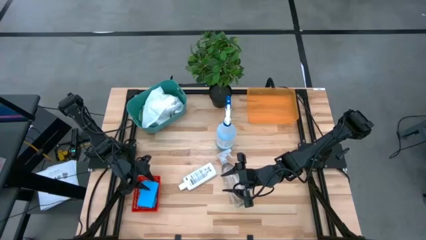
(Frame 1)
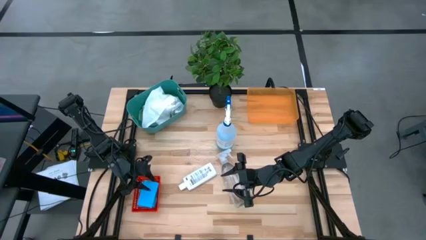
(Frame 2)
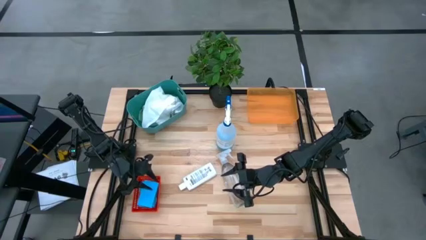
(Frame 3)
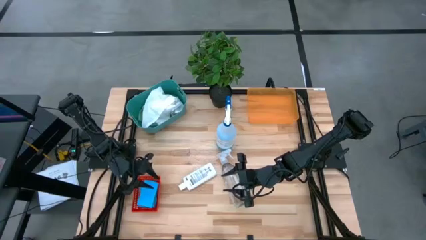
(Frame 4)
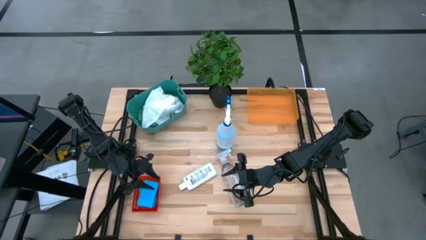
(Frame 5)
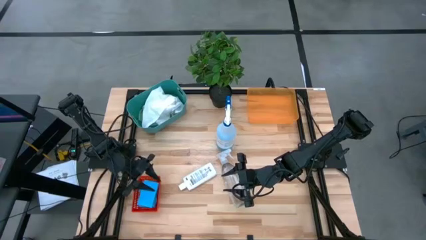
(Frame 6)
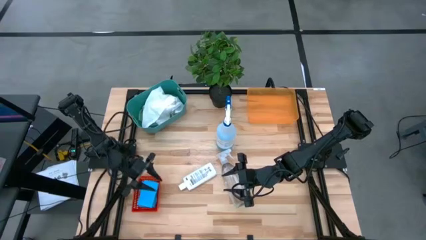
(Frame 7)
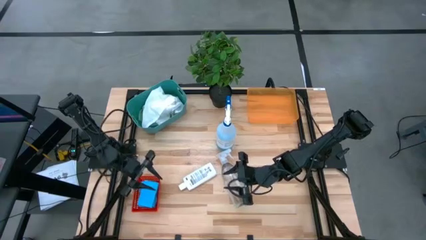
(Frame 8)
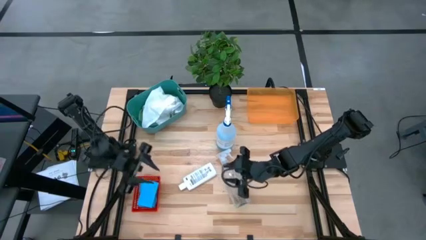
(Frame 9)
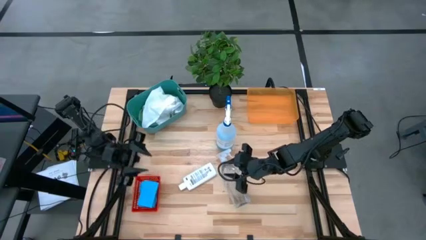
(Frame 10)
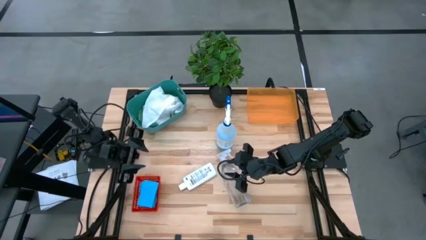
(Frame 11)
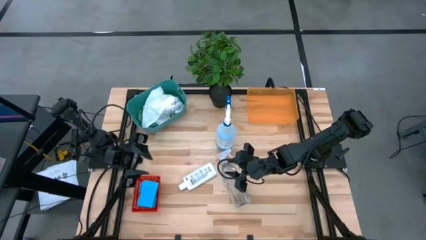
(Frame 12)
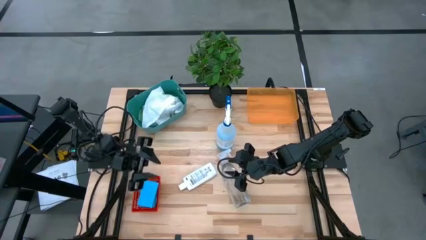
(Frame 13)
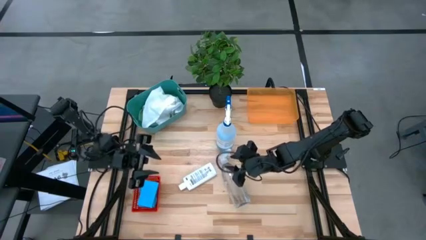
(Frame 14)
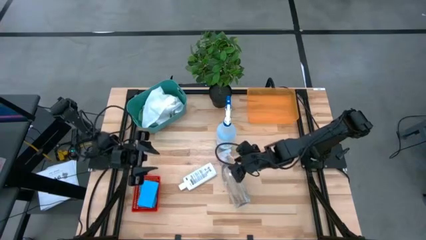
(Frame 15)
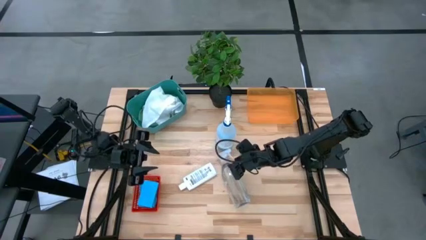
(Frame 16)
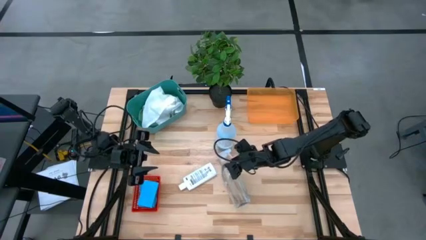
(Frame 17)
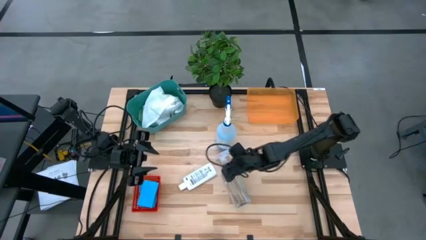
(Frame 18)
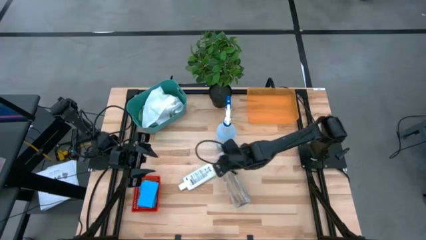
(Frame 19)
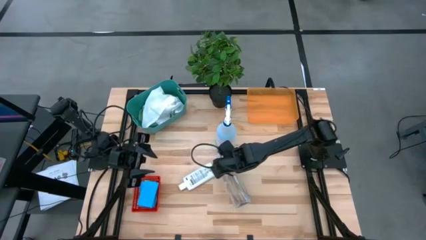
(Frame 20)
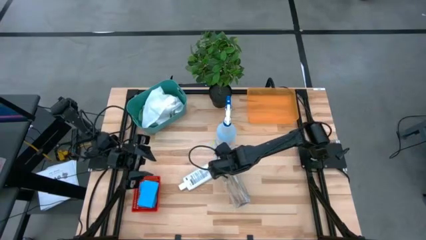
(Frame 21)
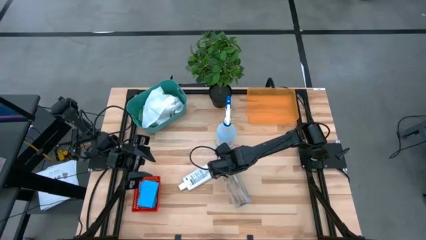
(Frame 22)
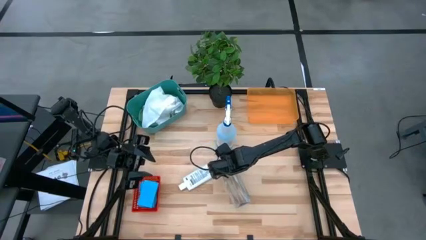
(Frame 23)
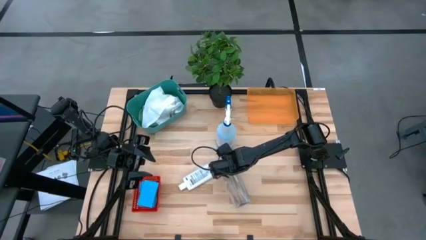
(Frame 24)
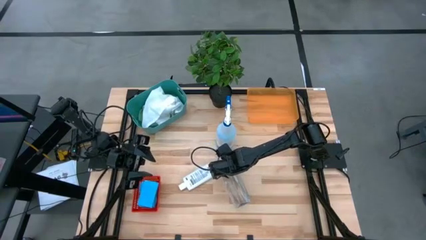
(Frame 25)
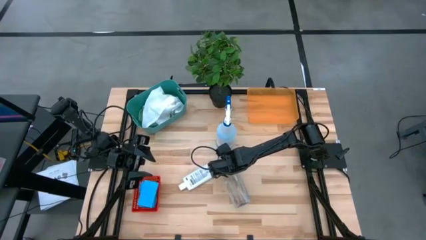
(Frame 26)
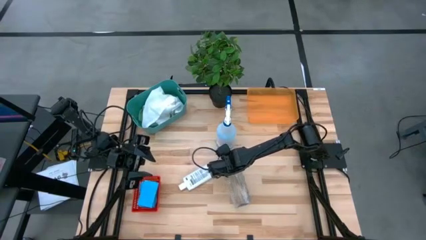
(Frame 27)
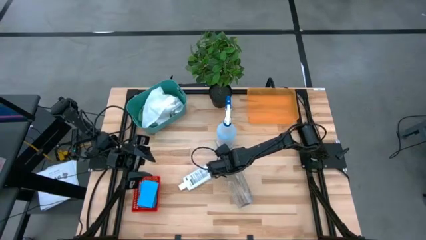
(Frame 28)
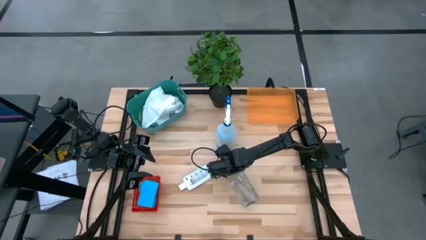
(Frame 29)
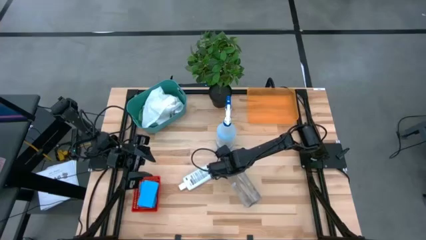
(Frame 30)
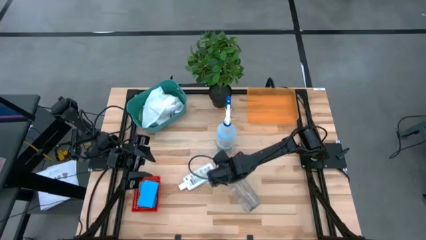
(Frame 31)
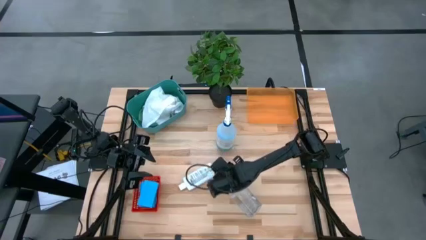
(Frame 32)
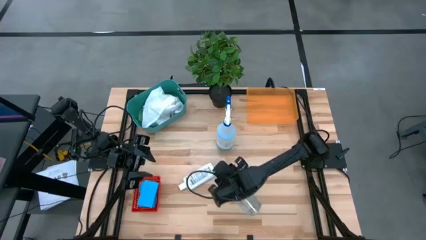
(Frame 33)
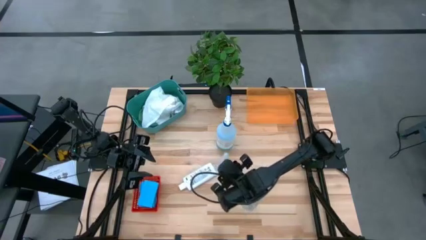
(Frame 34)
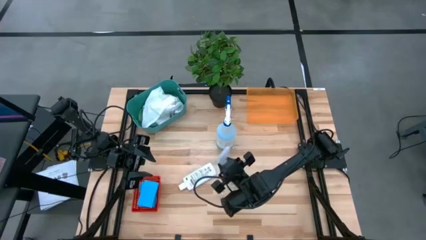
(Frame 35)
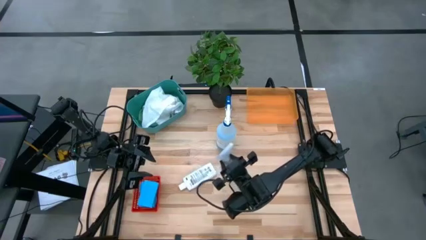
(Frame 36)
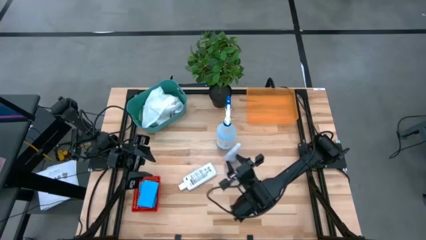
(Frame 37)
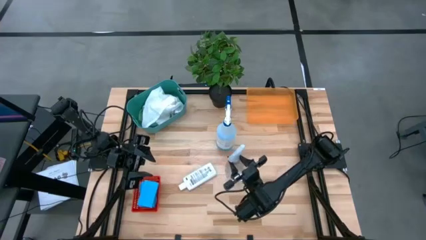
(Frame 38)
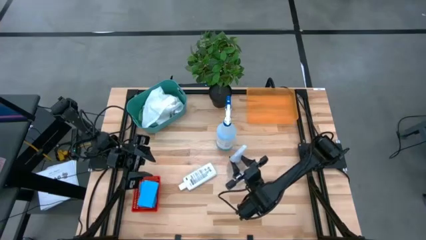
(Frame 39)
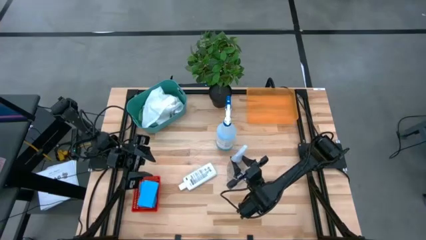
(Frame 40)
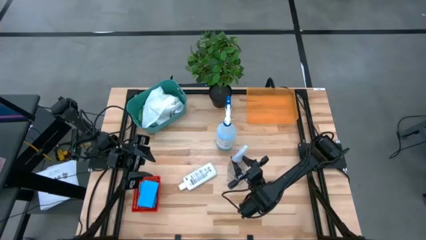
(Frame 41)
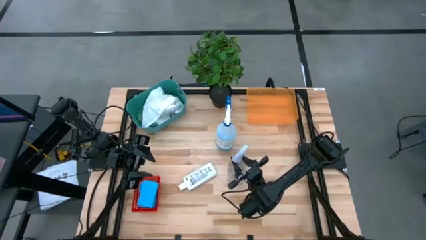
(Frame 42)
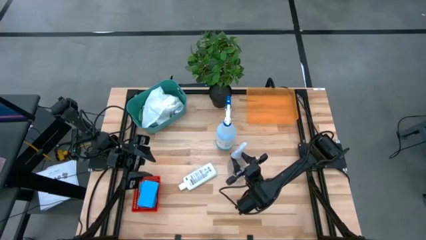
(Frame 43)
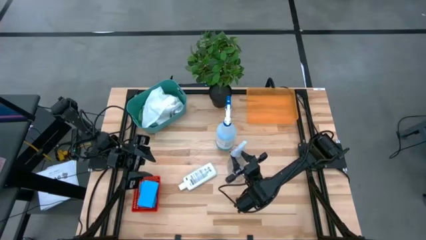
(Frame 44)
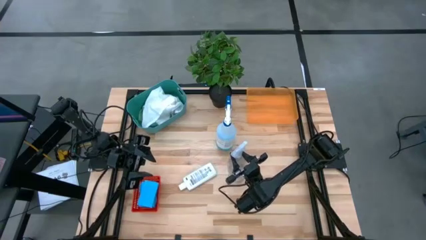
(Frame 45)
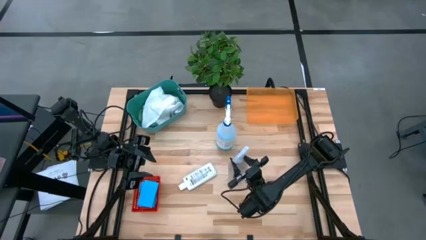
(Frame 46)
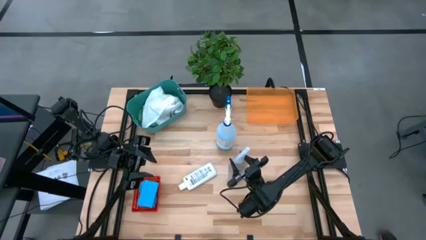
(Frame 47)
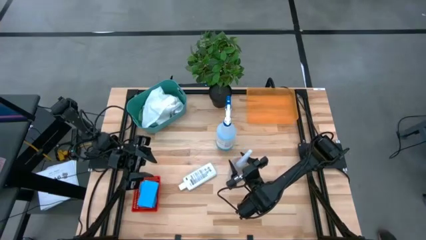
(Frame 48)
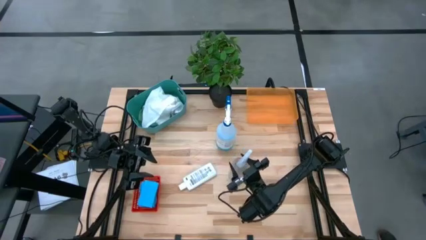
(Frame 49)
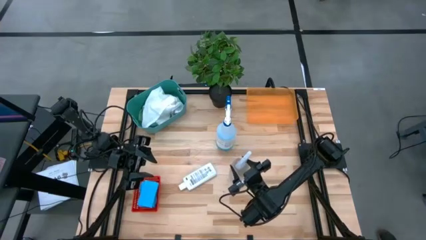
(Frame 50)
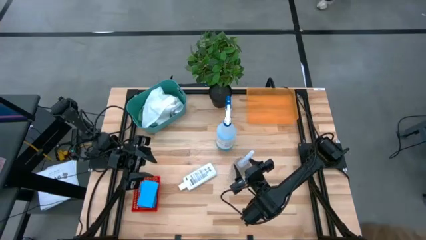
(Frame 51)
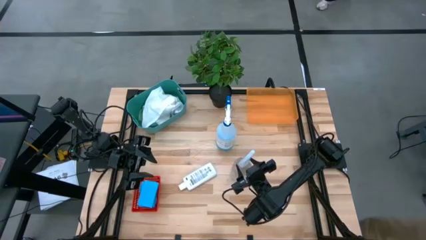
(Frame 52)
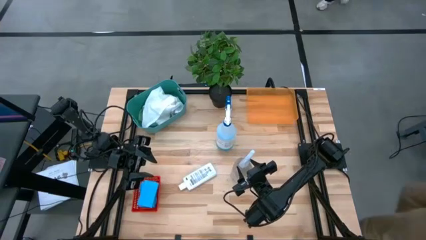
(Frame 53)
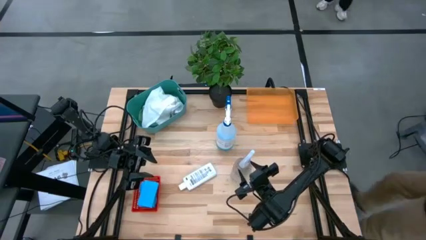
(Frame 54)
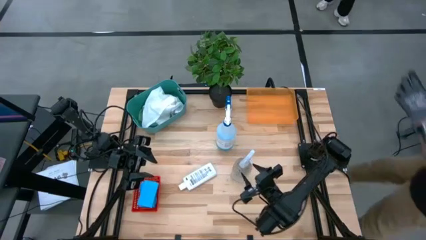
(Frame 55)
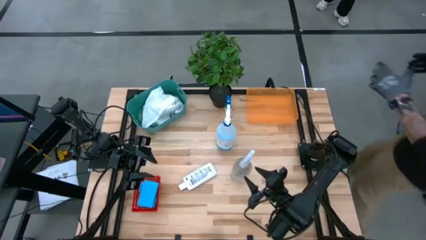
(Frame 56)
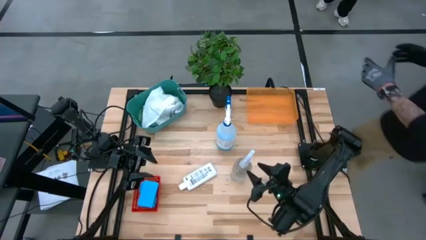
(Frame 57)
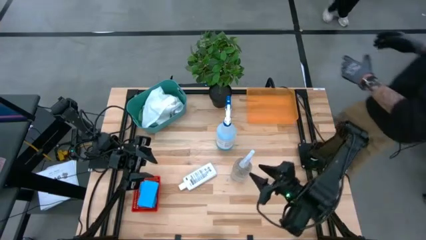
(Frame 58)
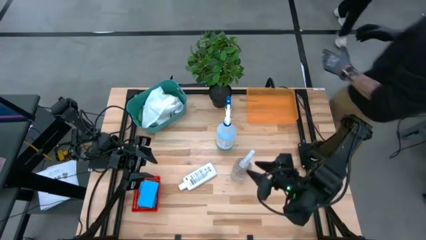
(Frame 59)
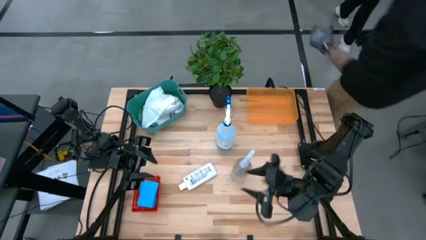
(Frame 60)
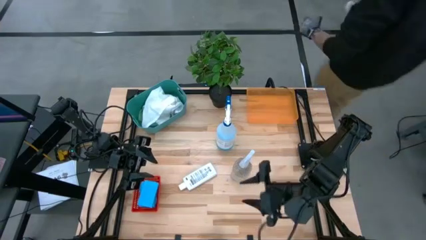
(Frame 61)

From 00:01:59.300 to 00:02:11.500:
Task: Pick & Place Kitchen Items
Put the transparent bottle into the orange bin

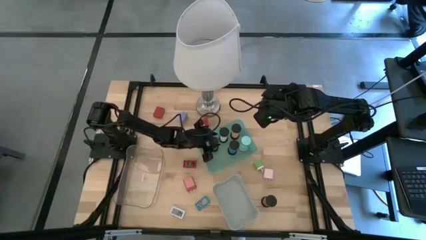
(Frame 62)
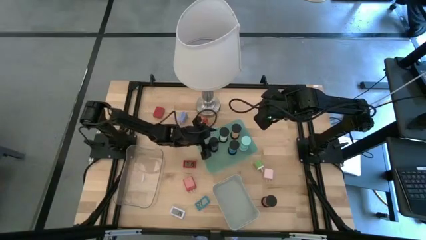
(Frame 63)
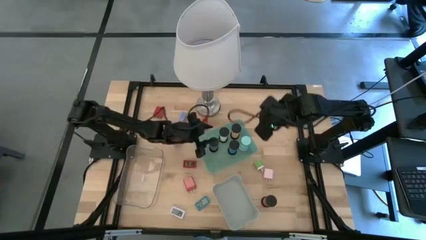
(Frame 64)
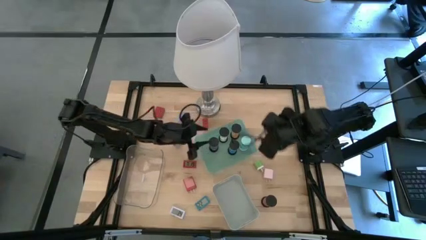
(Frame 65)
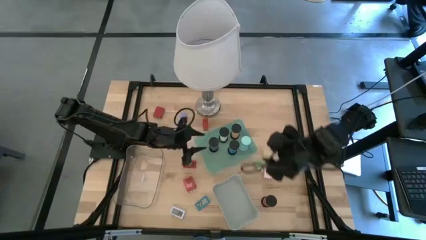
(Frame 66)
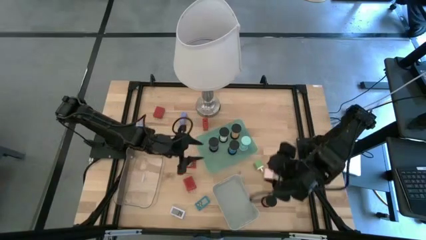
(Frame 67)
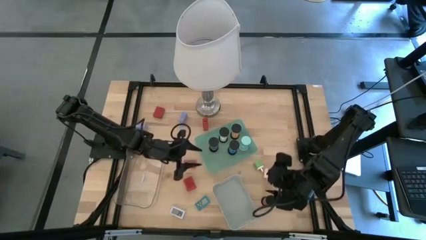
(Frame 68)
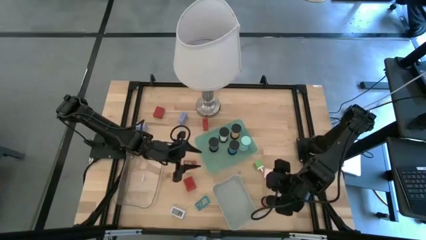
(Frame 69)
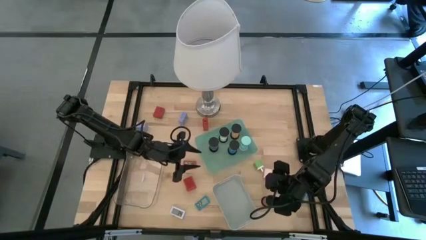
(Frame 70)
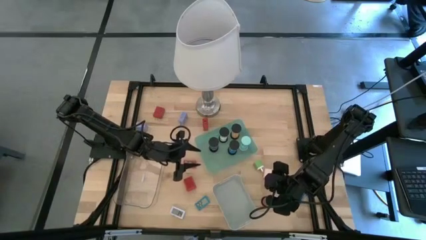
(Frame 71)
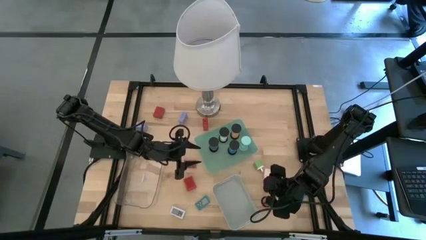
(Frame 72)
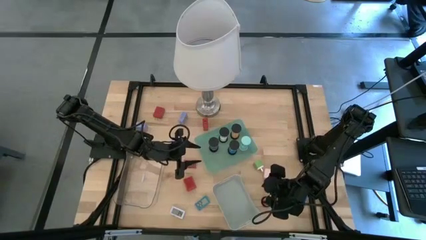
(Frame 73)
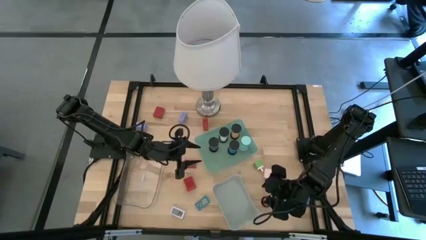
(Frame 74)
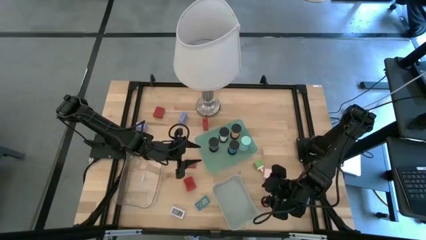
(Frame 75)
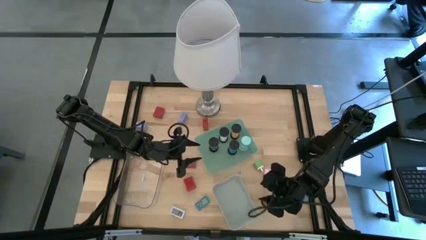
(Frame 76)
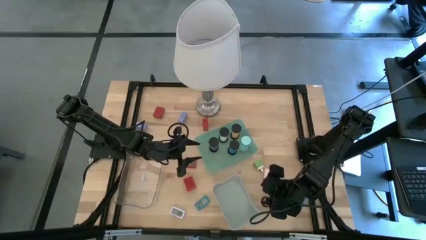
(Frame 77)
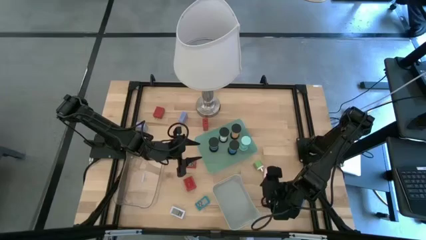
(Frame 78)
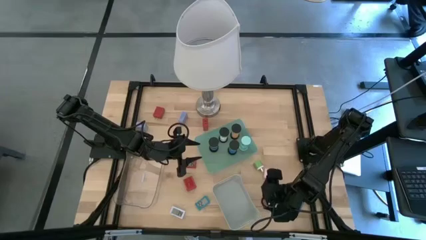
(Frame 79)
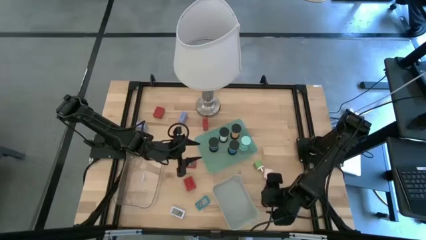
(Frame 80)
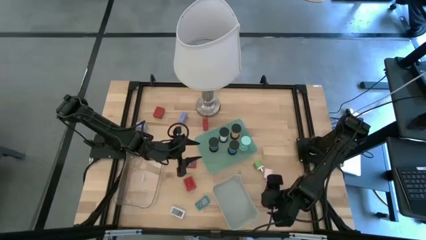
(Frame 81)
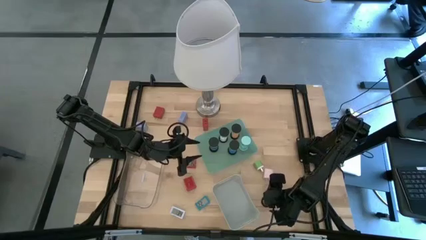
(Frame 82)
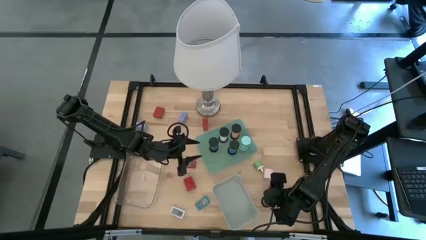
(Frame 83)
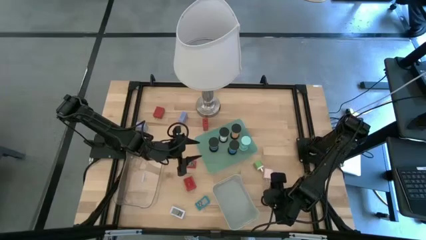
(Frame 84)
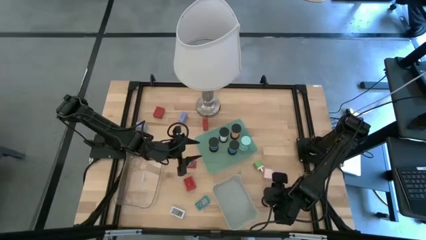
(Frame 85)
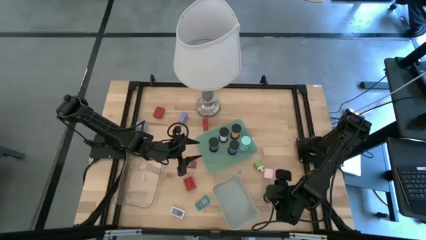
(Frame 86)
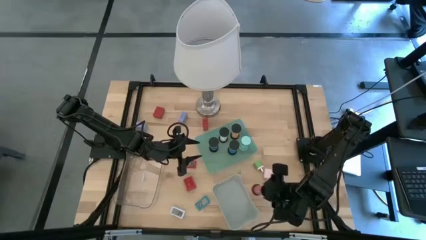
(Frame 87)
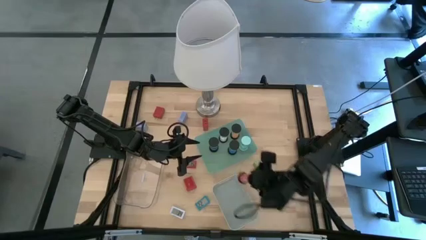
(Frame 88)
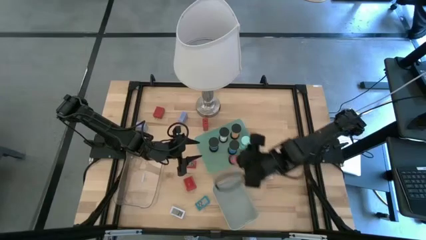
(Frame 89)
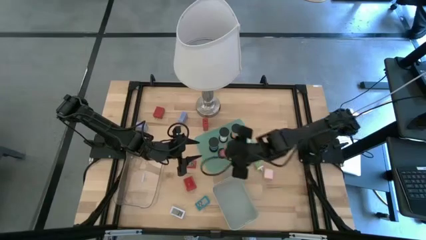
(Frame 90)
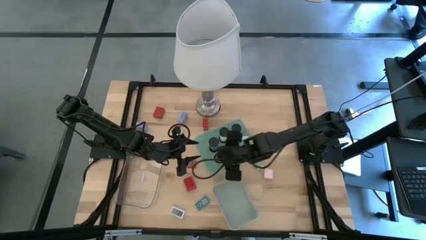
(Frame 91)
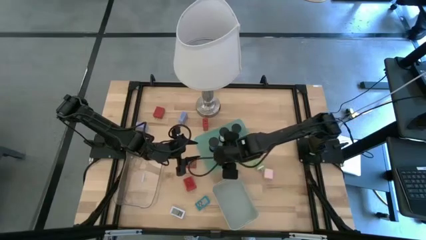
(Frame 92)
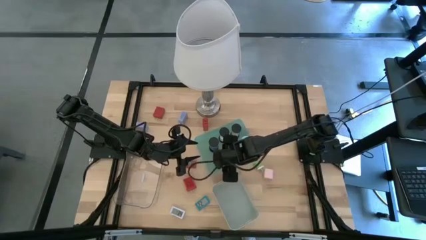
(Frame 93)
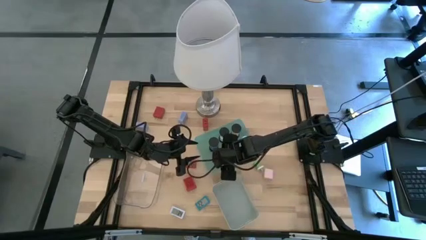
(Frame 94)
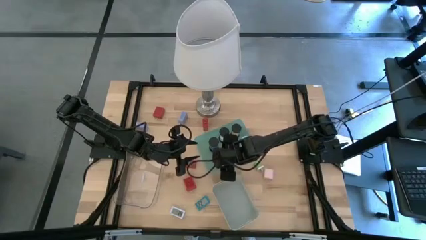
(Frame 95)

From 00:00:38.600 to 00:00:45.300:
Task: Pick & Place Office items
Put the red hourglass into the green bin
